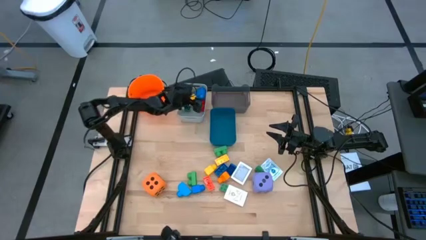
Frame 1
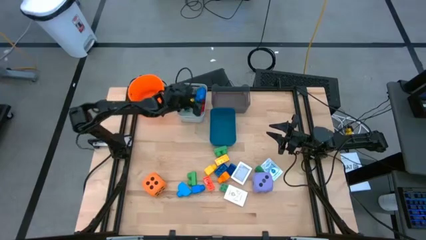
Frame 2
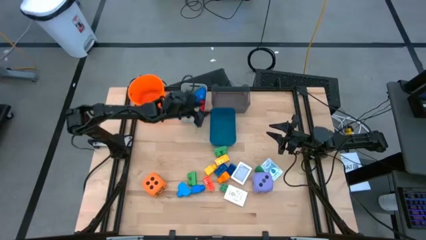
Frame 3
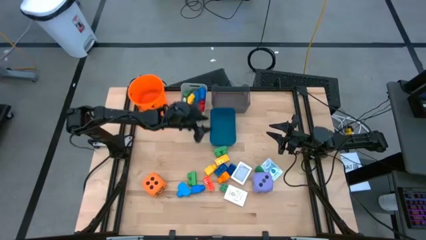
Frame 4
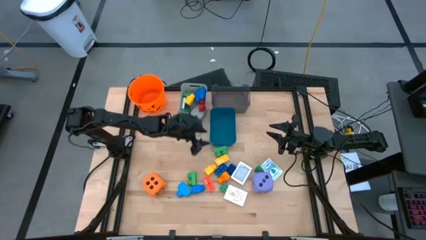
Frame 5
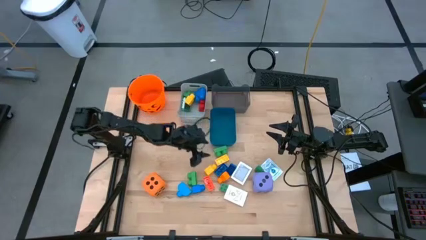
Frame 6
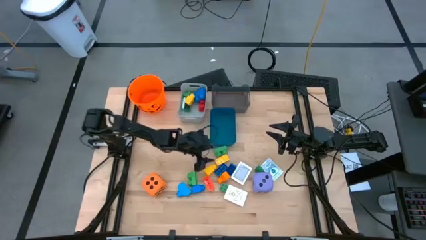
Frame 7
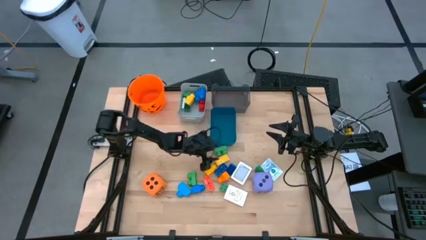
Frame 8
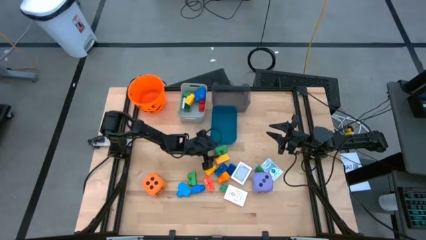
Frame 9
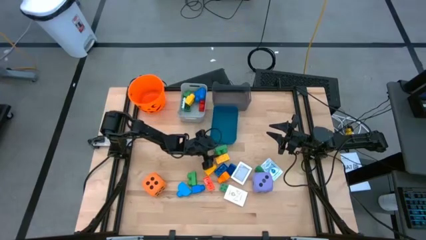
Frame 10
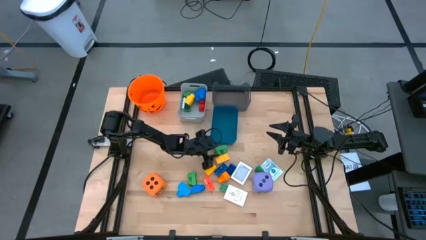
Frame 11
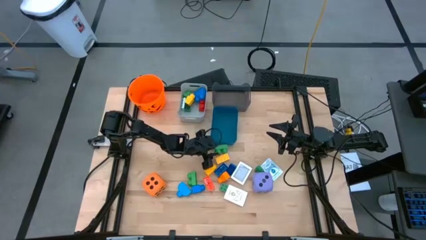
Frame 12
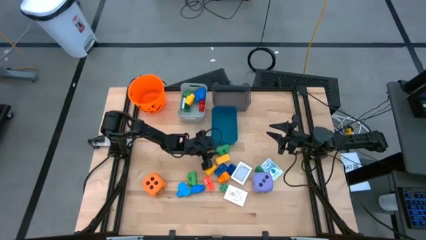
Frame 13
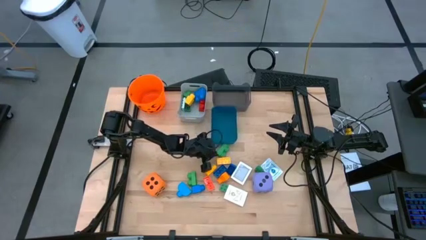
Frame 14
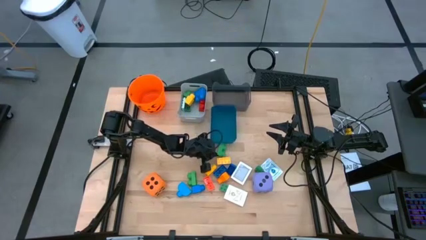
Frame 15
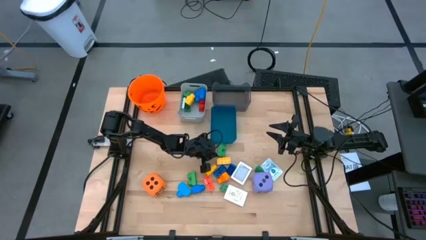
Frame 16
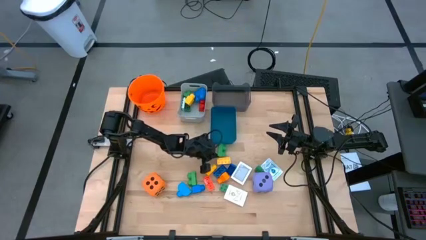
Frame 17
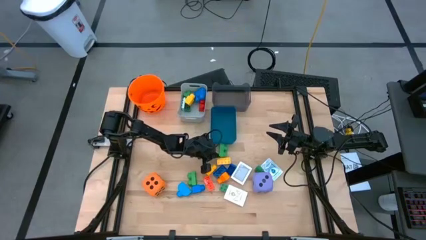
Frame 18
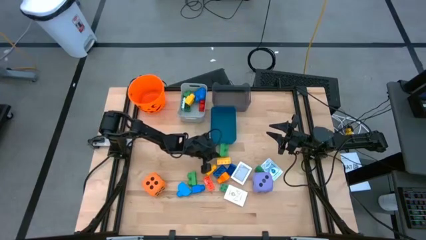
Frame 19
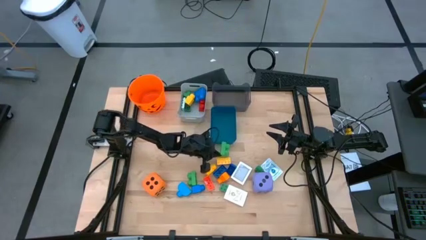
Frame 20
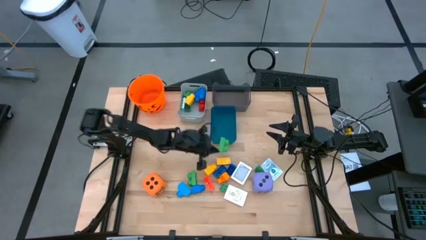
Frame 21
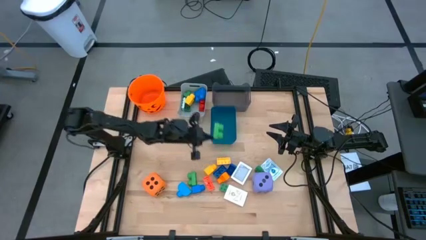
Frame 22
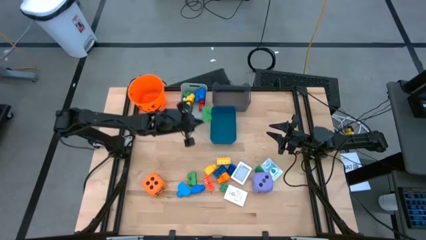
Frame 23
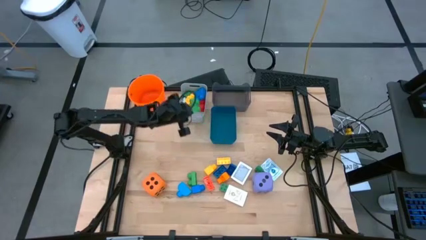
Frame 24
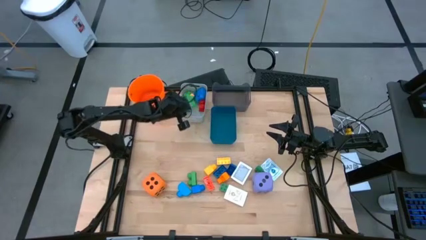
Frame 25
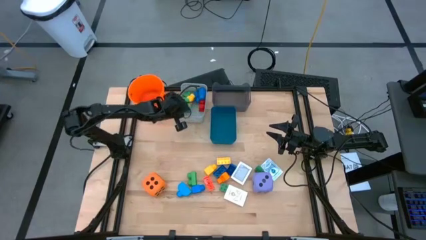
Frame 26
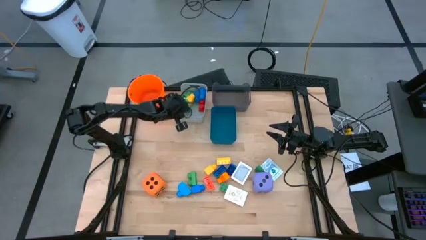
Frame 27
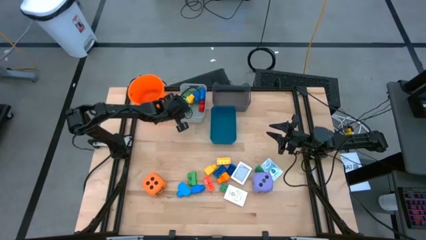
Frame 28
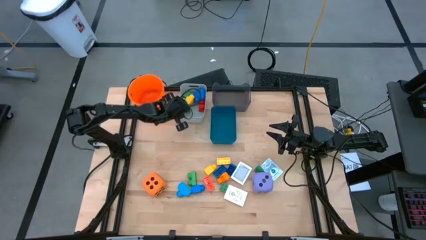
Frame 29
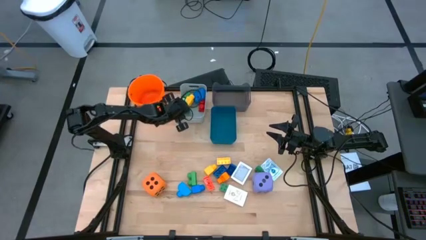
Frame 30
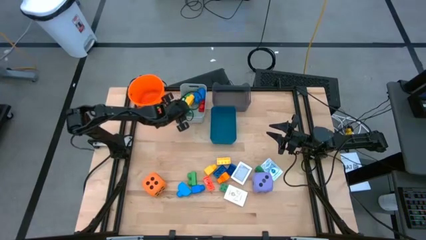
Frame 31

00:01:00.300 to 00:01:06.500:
Task: Pick & Place Toys
Put the green 2 stud gamepiece into the white bin

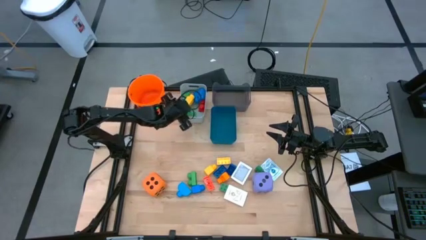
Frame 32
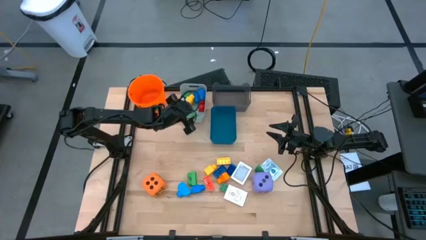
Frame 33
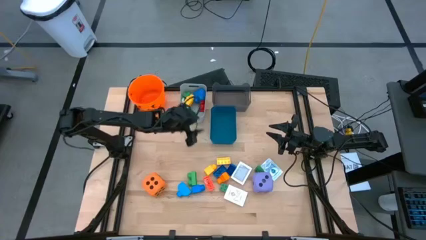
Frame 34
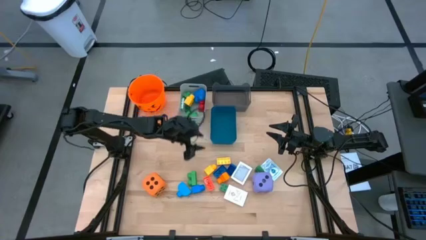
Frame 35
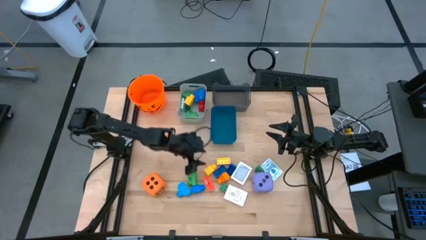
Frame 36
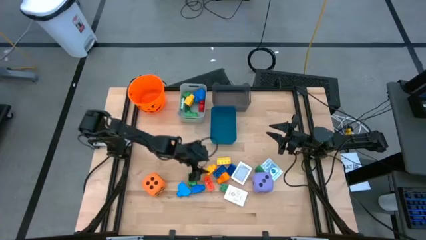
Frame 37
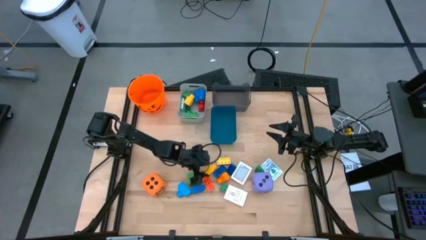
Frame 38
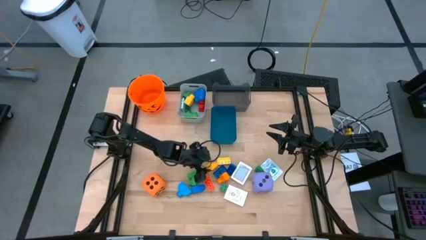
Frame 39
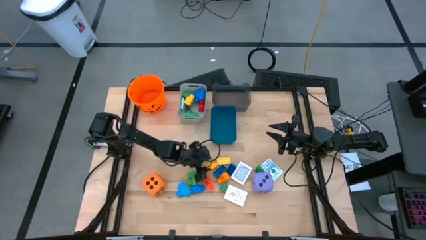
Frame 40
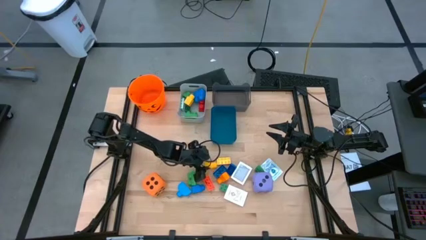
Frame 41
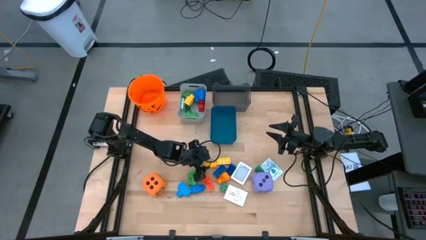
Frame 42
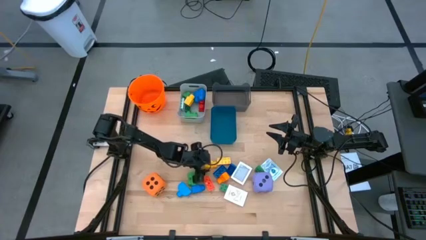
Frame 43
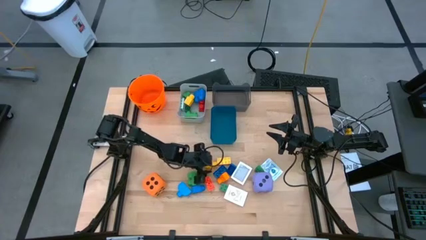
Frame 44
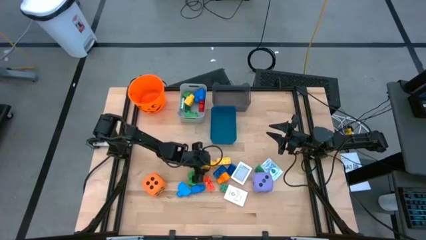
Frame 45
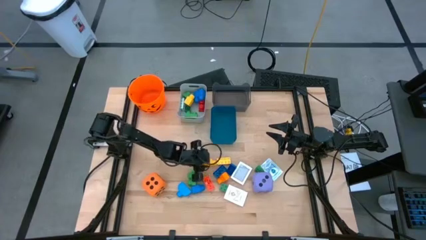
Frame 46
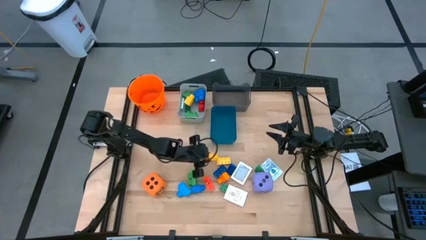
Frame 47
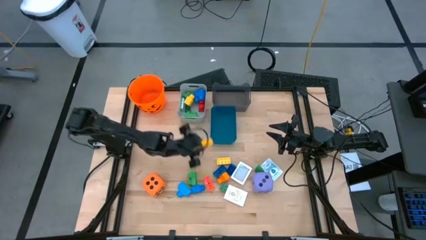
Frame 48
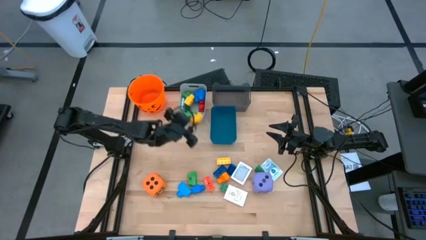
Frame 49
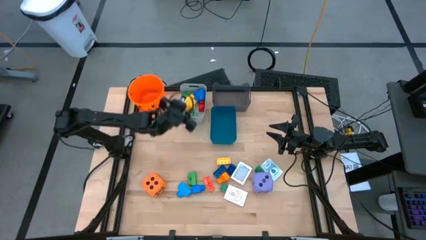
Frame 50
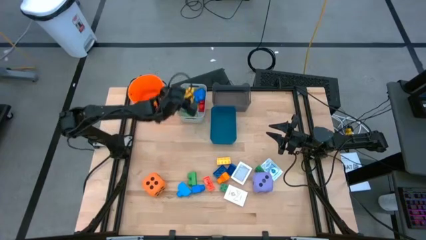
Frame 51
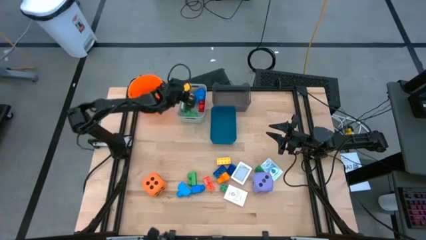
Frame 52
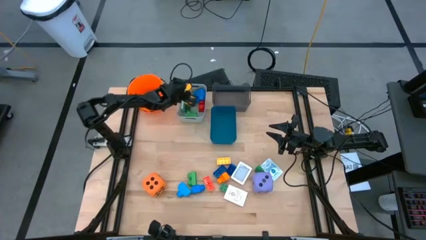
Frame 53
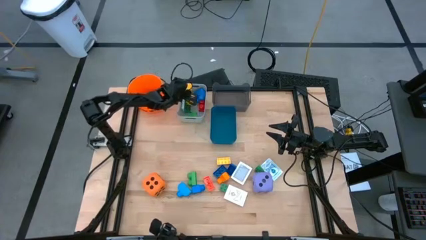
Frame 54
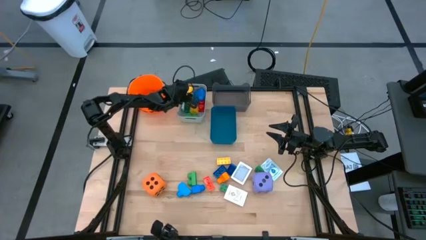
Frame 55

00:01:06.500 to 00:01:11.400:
Put the yellow 1 stud gamepiece into the white bin

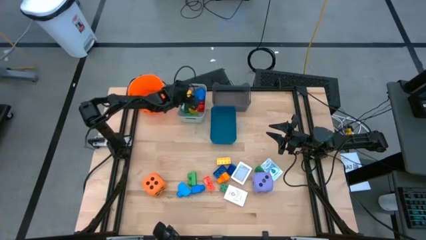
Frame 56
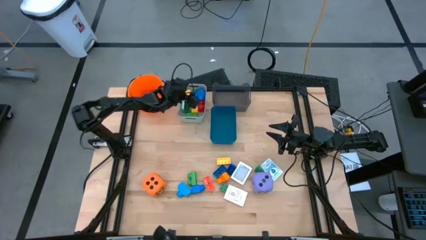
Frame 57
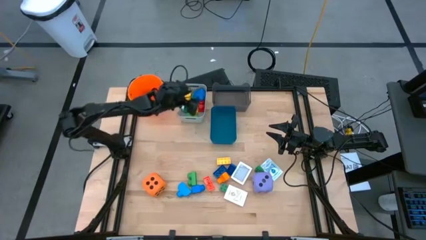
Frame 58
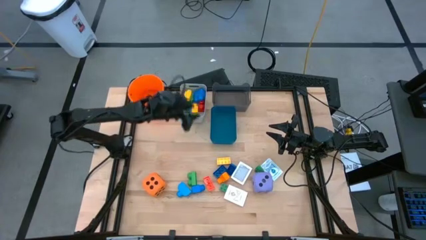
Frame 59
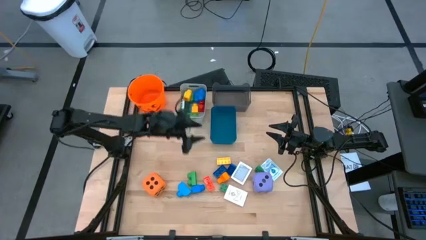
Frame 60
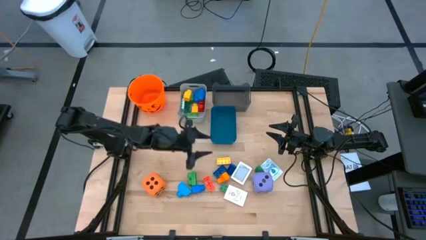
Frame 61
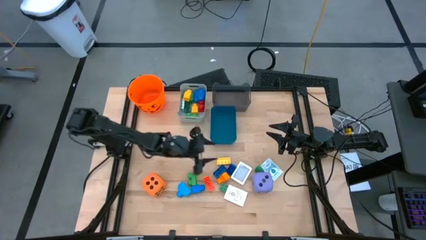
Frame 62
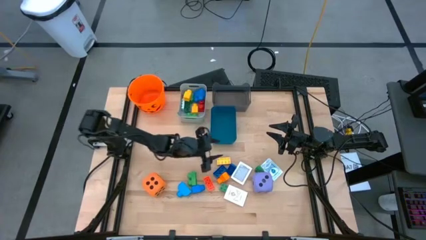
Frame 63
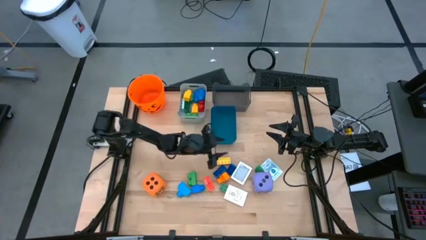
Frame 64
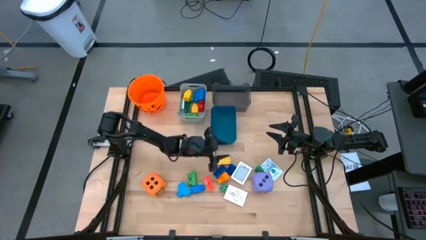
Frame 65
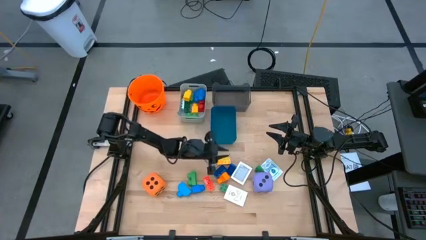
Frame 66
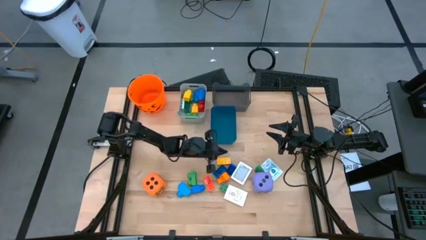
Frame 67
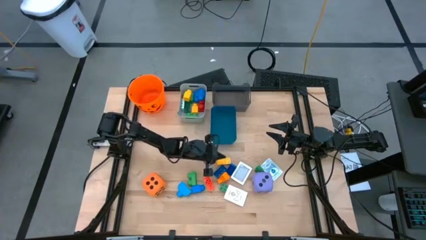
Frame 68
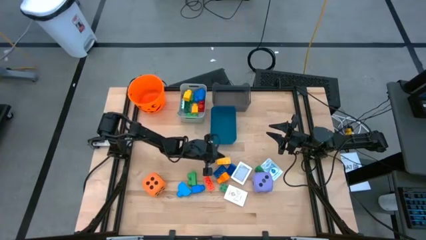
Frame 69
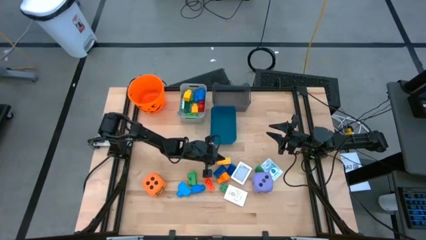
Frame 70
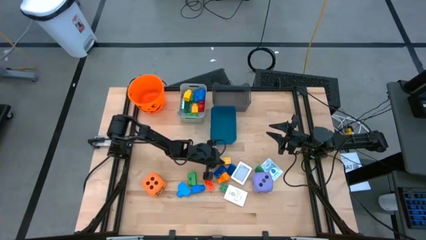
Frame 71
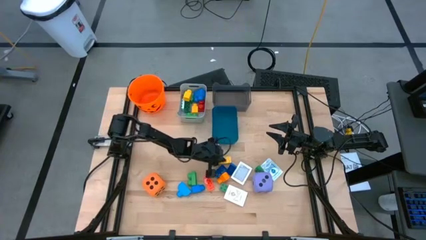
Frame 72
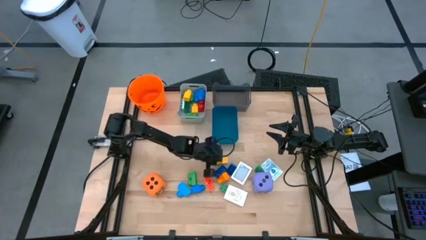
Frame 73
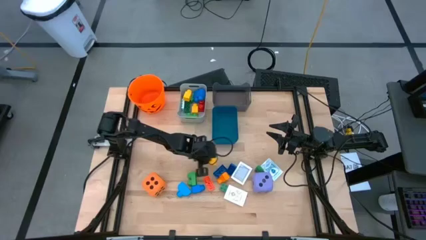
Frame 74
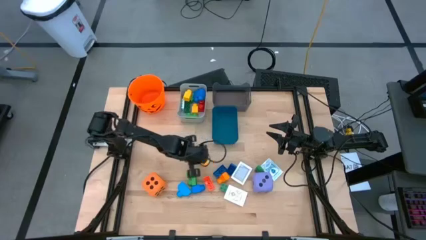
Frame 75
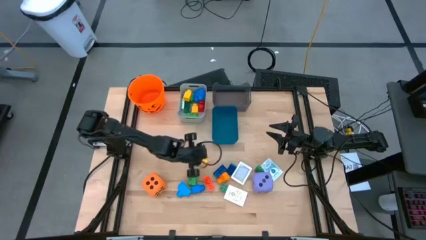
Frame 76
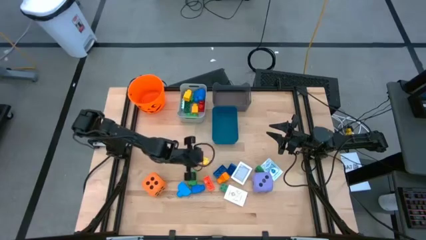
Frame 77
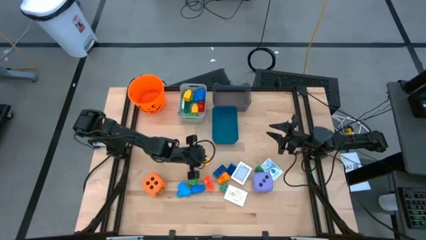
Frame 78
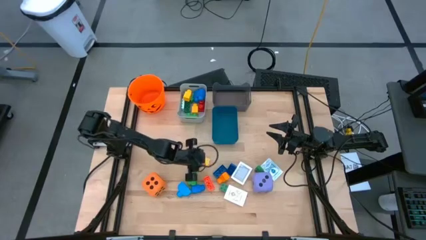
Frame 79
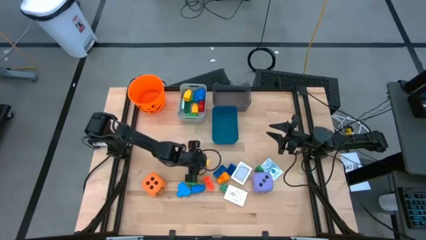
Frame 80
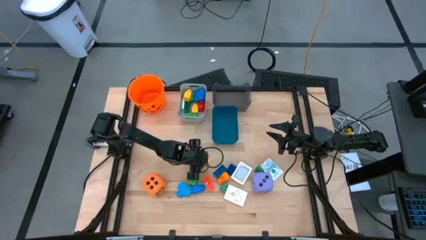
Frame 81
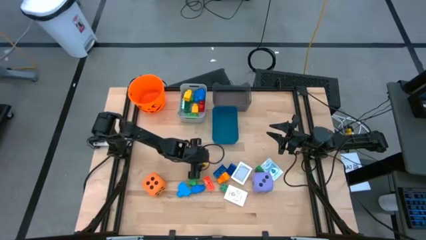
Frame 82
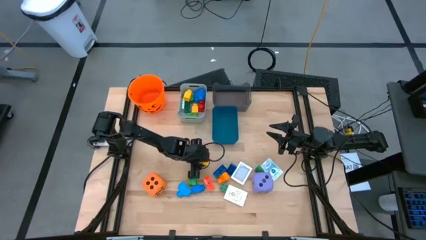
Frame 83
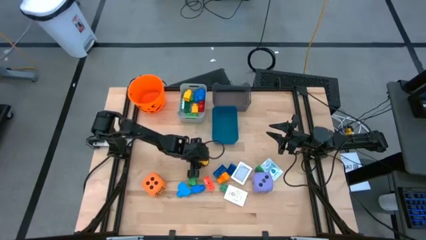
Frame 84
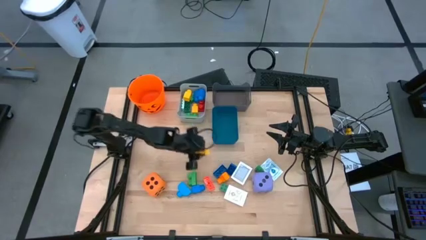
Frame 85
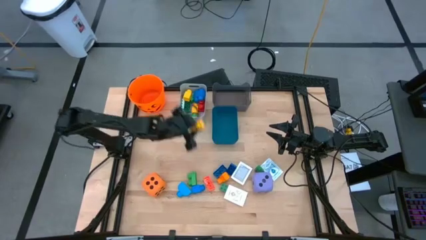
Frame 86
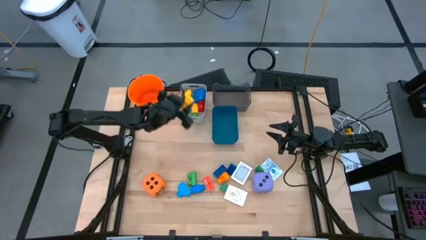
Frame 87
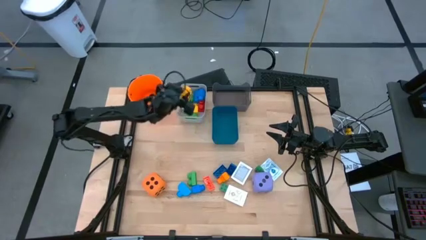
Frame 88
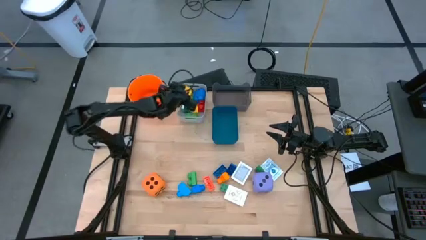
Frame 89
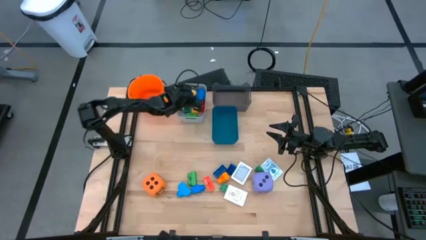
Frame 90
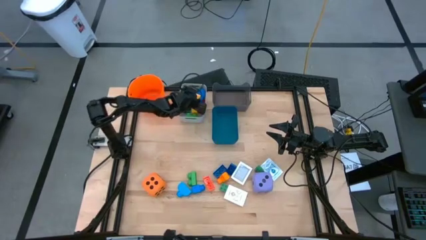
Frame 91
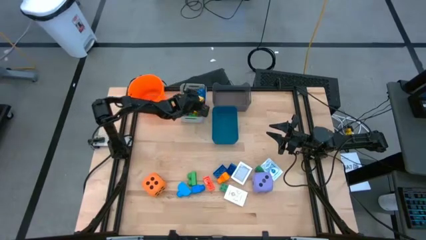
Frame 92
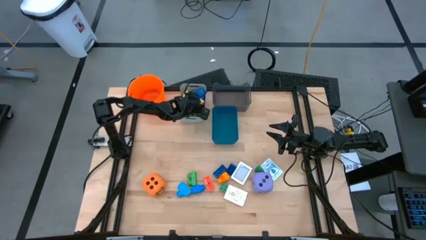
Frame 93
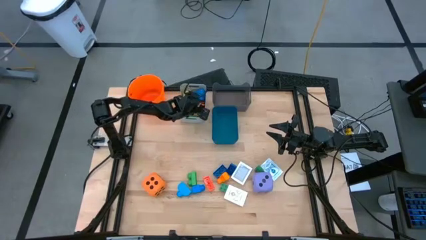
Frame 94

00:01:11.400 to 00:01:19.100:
Put the small yellow gamepiece into the white bin
